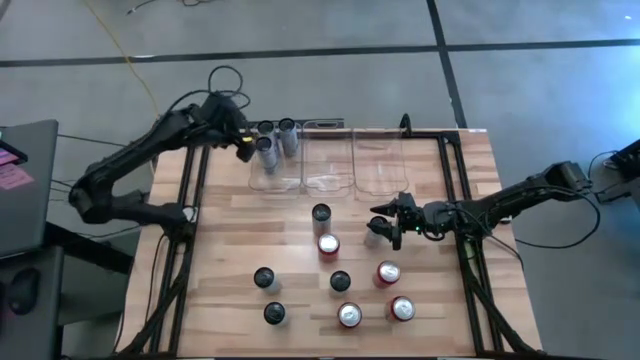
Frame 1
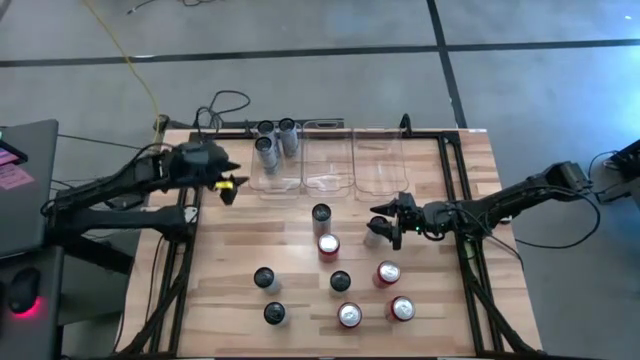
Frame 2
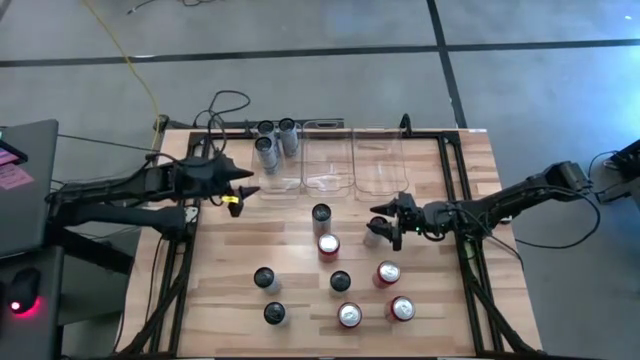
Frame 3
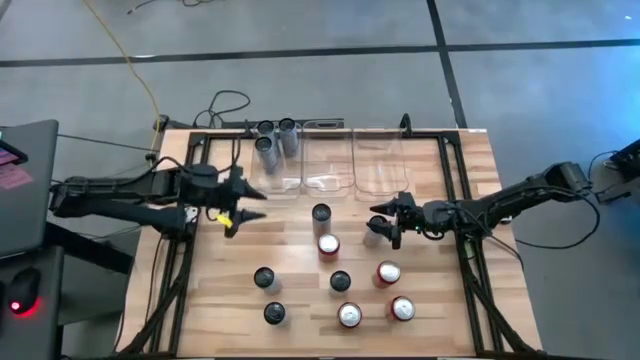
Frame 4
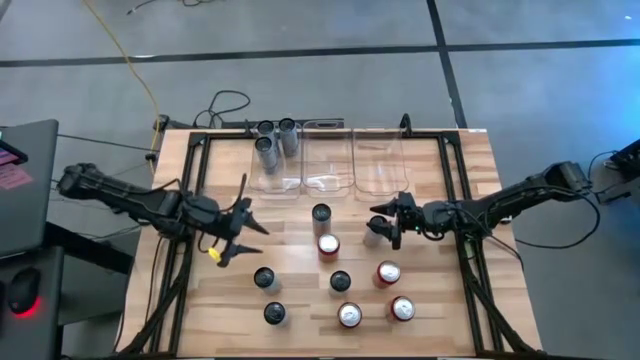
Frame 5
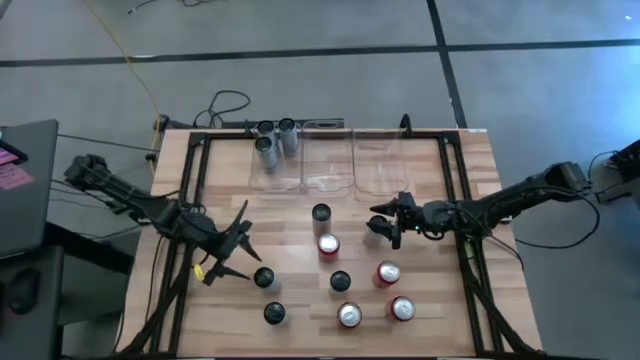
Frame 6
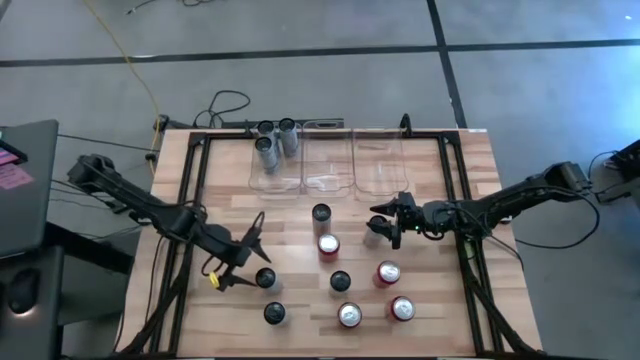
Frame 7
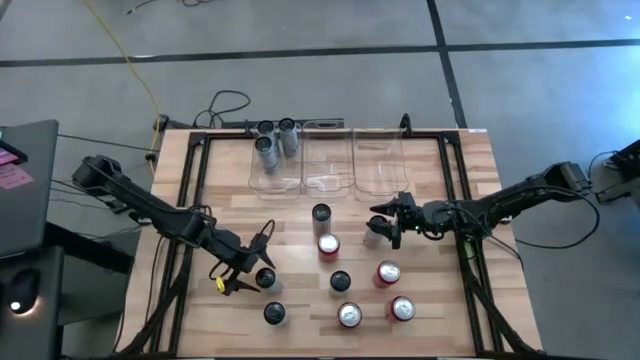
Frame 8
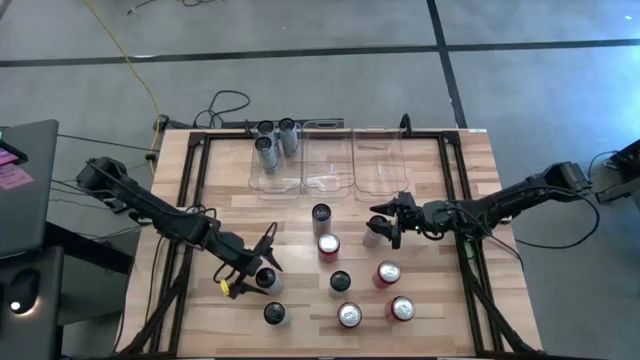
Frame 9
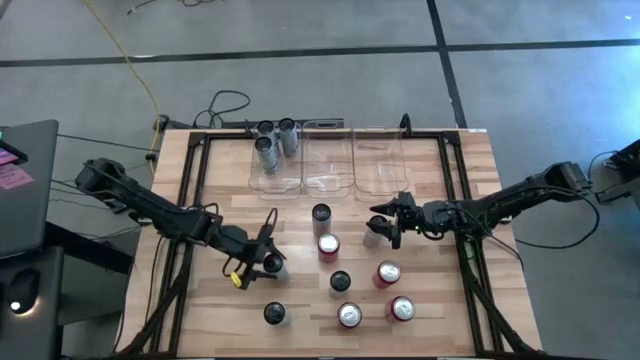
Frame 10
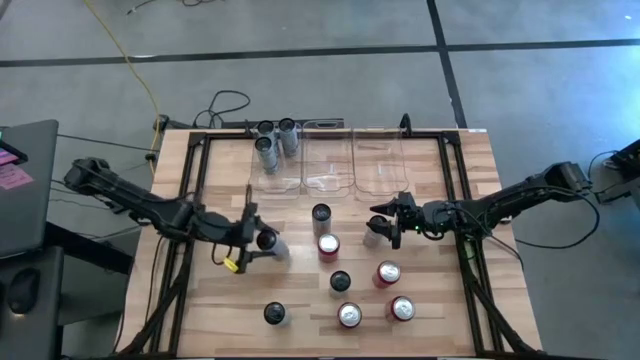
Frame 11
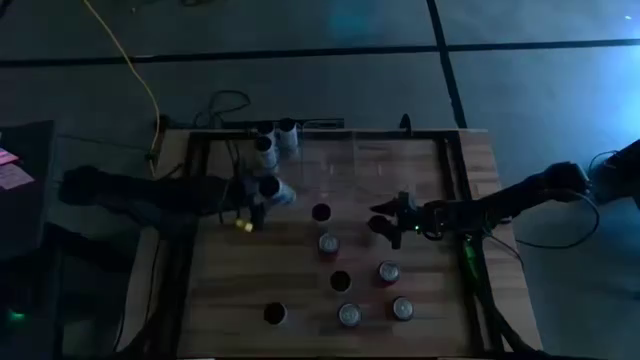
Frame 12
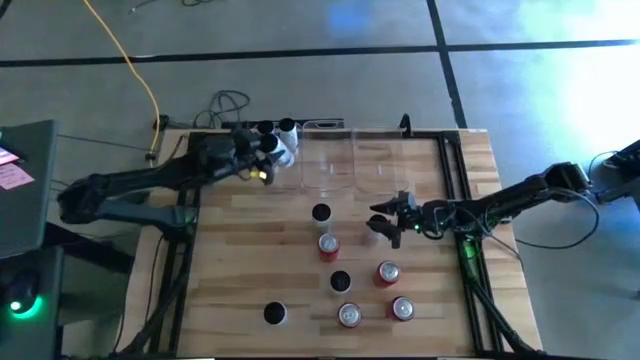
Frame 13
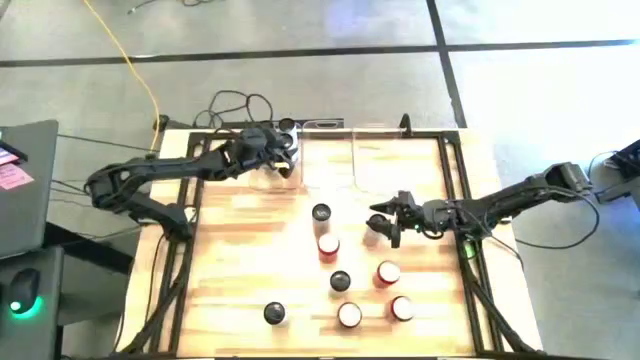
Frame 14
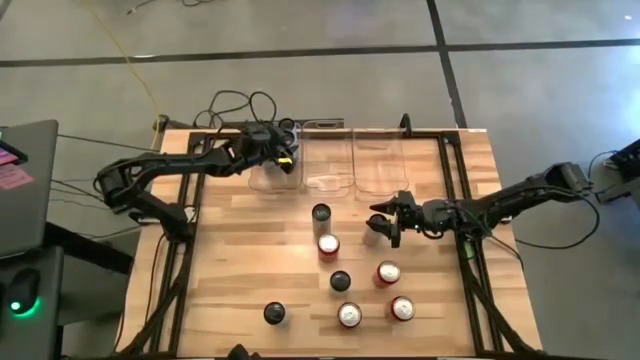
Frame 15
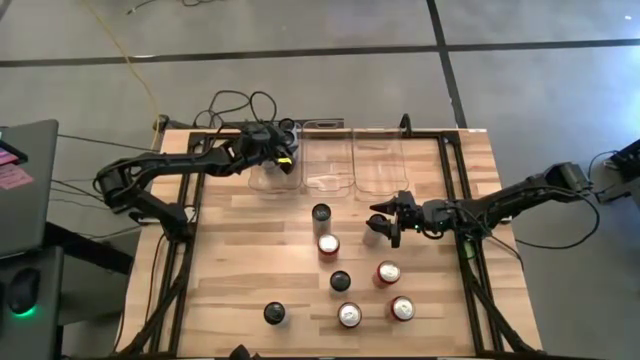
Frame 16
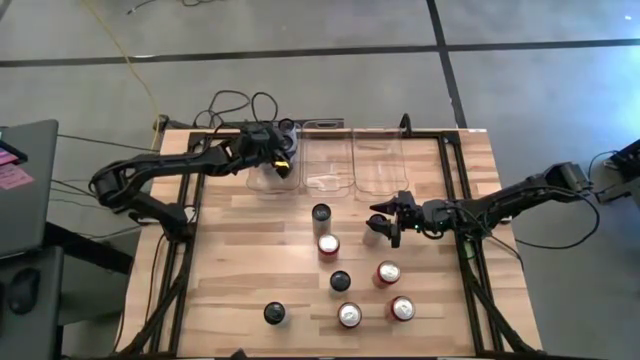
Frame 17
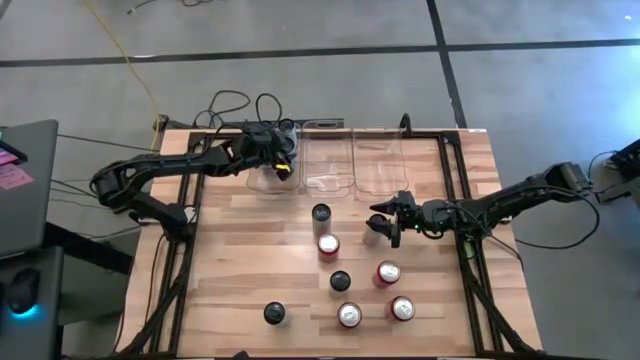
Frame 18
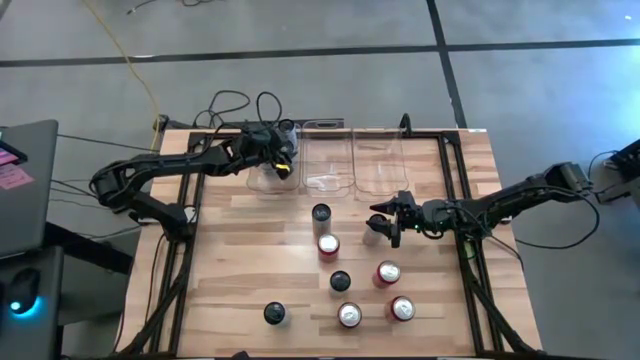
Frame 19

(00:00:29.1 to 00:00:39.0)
Task: Sort soda cans
Put the white-blue soda can into the left transparent bin

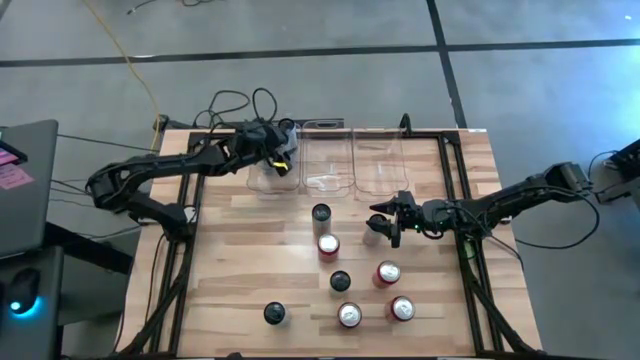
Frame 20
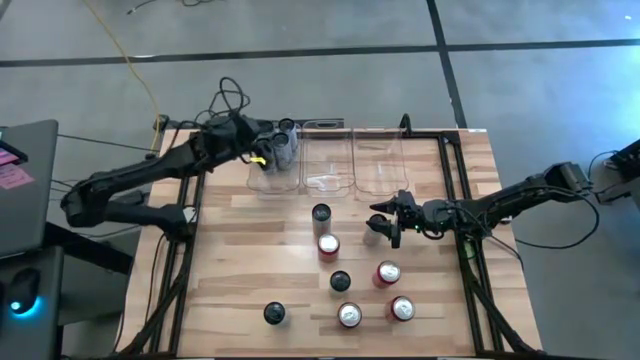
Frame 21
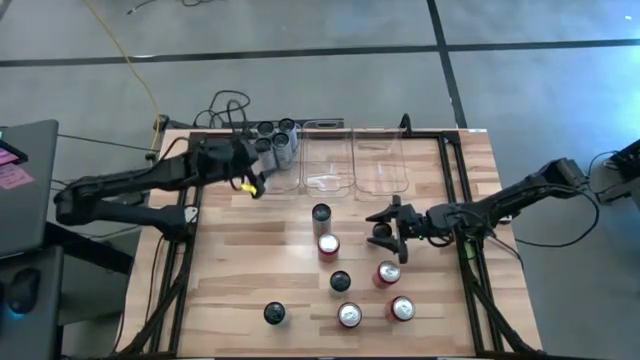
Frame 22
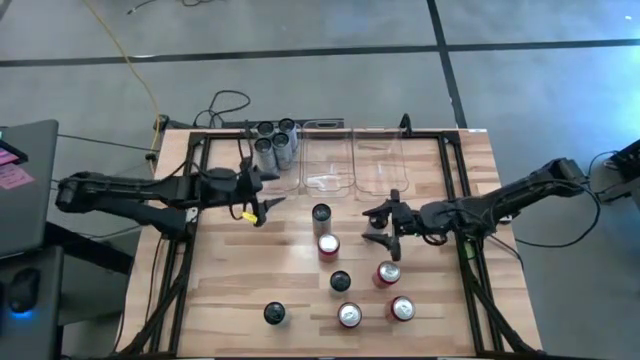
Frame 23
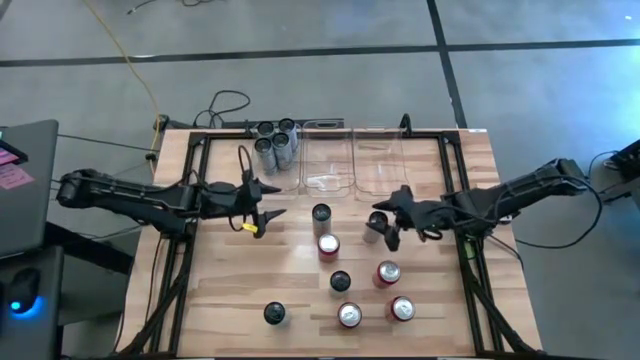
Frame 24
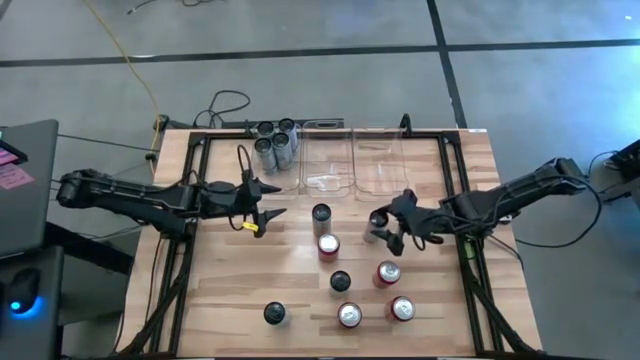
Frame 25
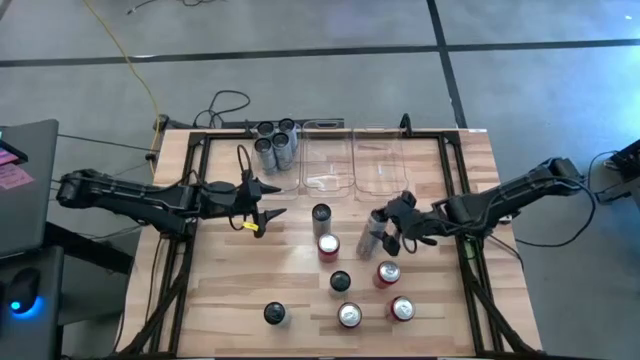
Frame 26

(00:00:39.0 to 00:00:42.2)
Put the white-yellow soda can into the right transparent bin

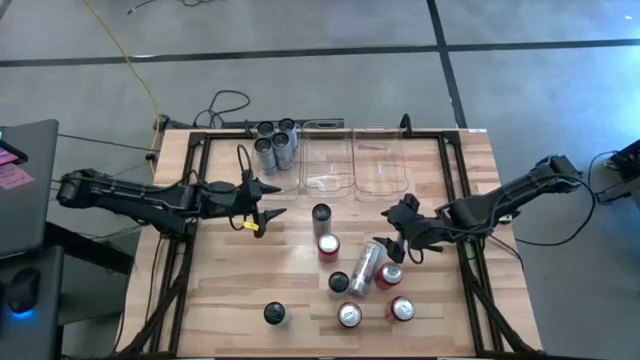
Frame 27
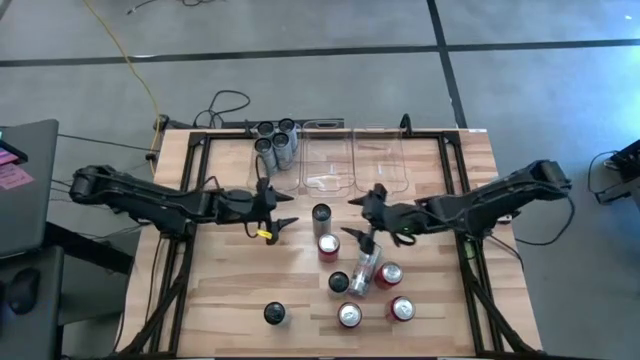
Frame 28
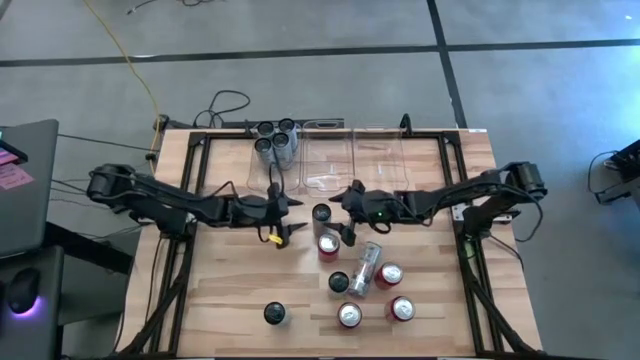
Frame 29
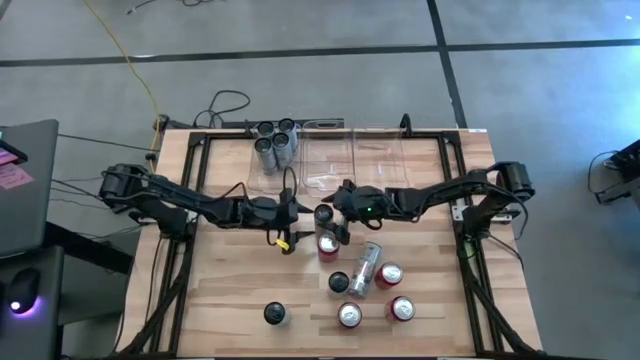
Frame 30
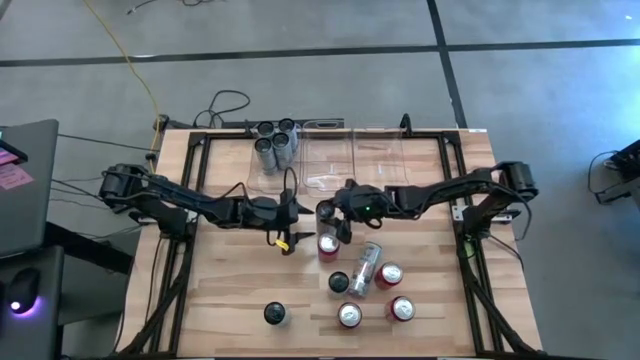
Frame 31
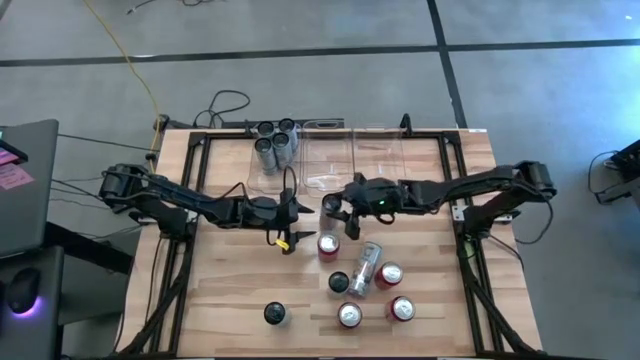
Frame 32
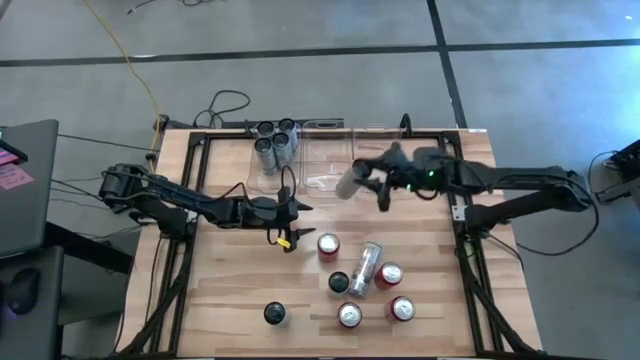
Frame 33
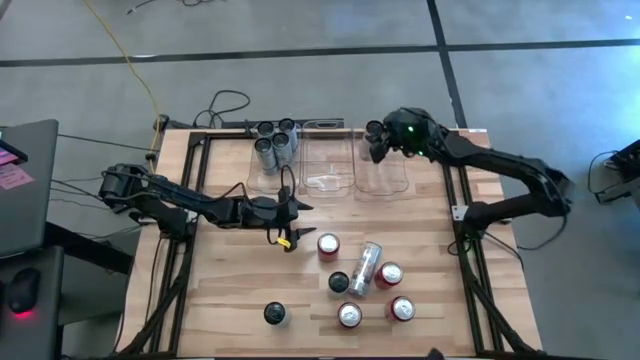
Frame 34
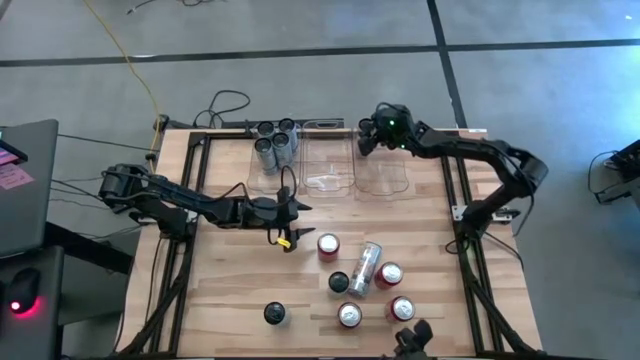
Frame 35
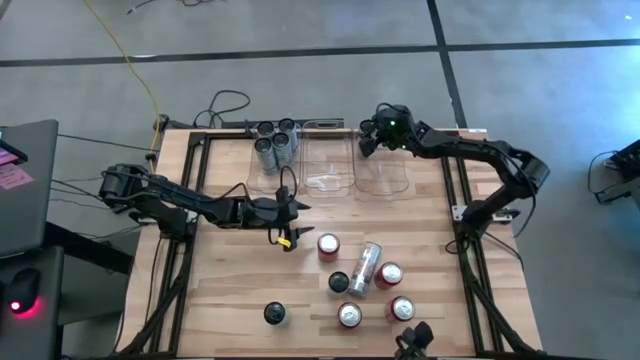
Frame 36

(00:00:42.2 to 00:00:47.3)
Put the white-yellow soda can into the right transparent bin

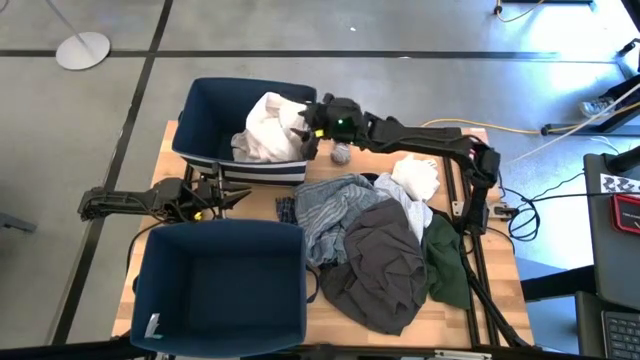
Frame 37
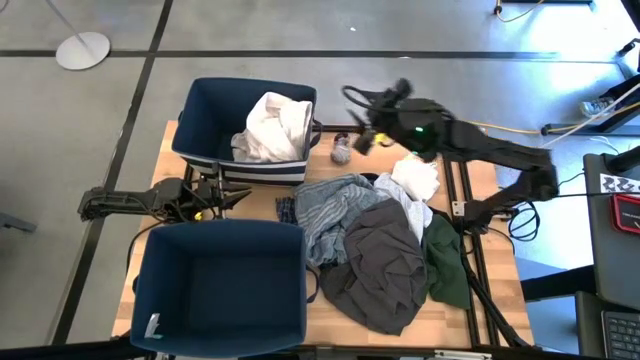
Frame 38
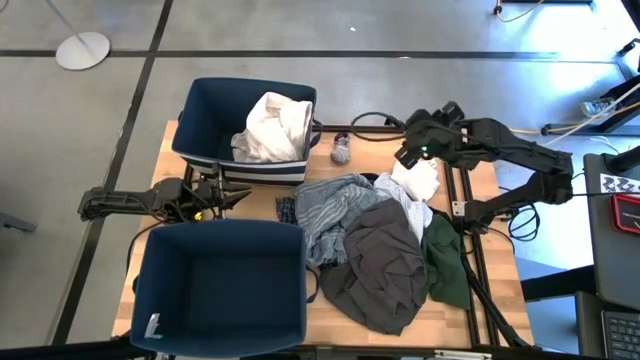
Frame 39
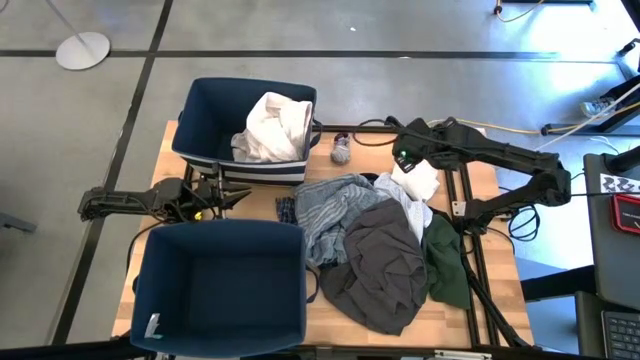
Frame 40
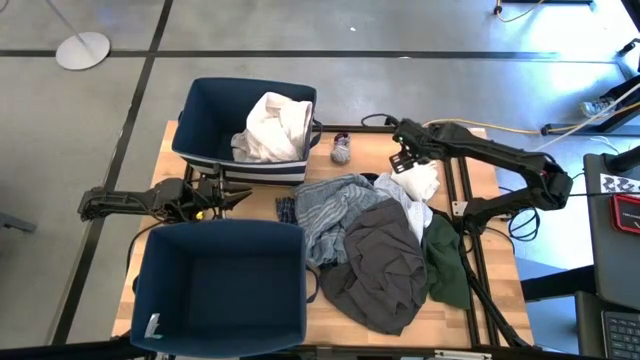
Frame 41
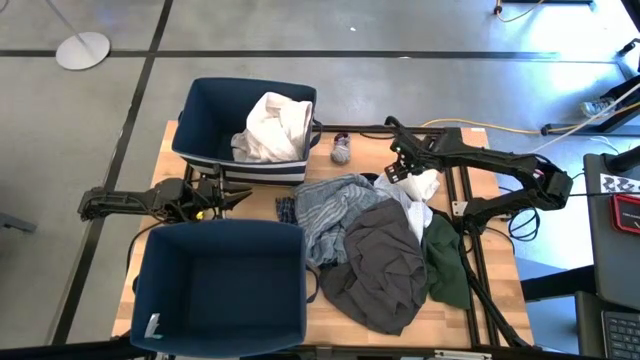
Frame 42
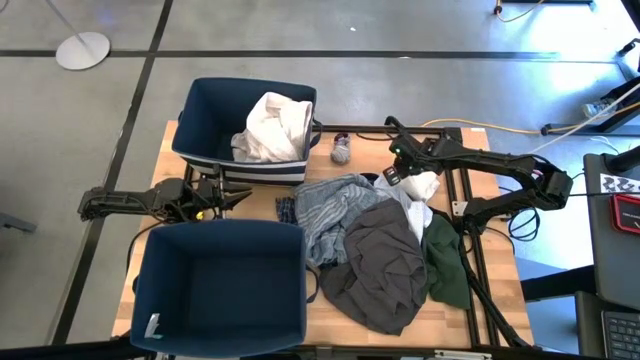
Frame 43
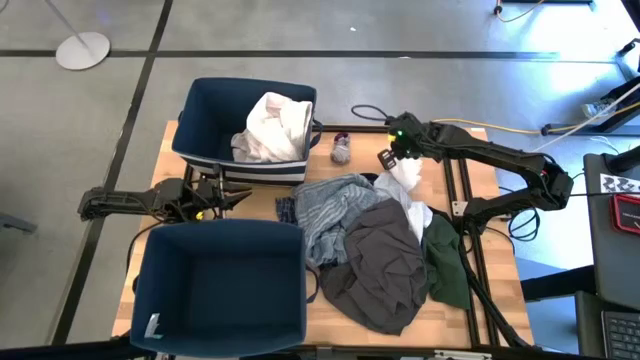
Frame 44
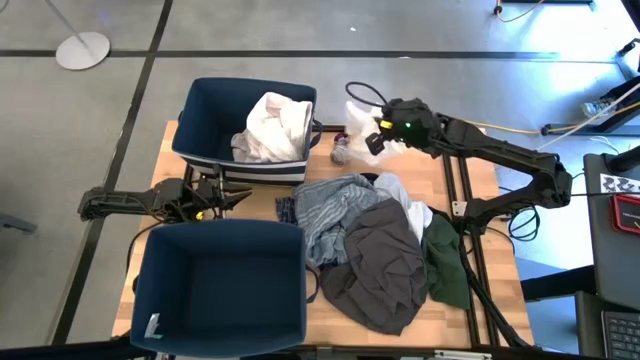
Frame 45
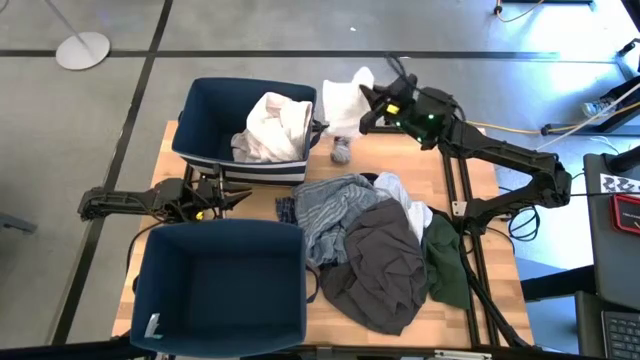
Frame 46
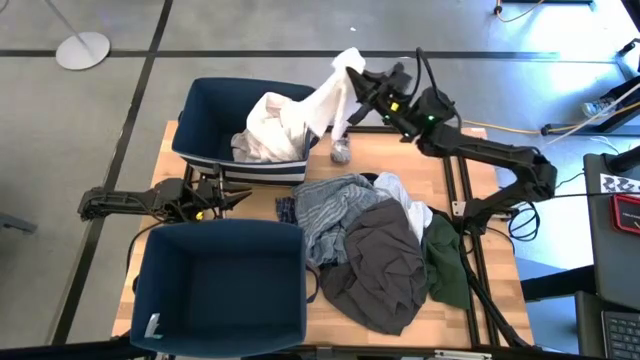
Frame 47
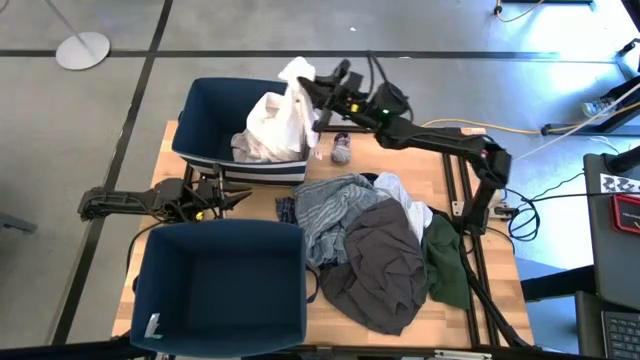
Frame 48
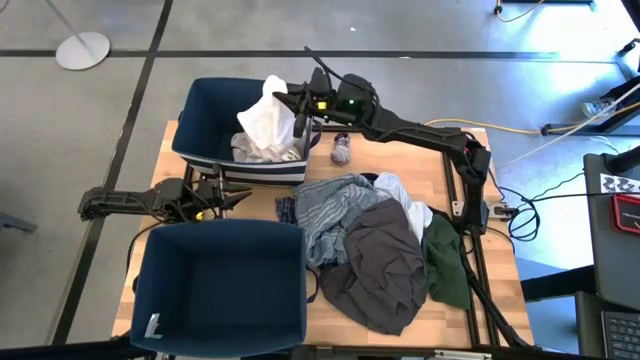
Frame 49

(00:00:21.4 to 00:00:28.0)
Task: Sort clothes
Put the white short pants into the top blue laundry organizer
